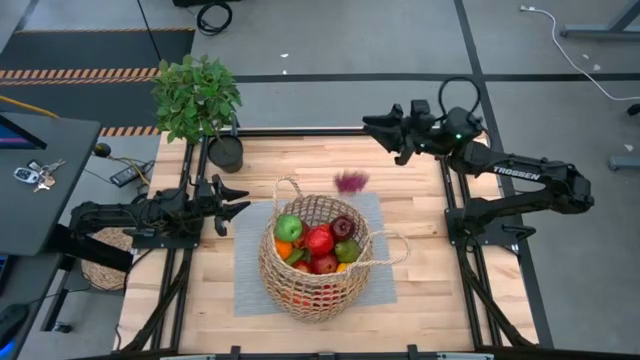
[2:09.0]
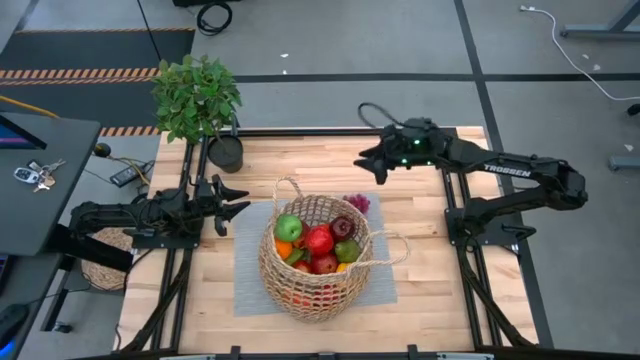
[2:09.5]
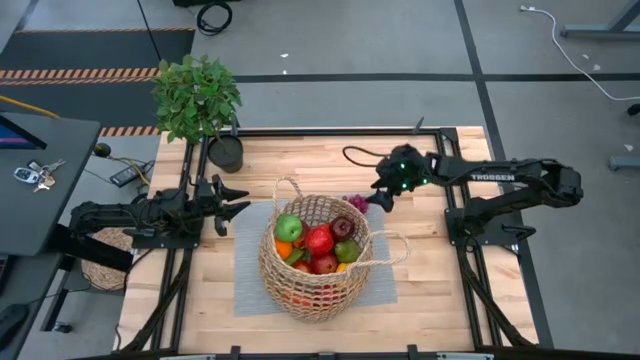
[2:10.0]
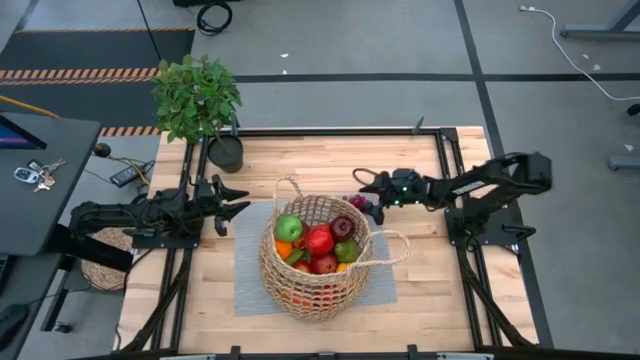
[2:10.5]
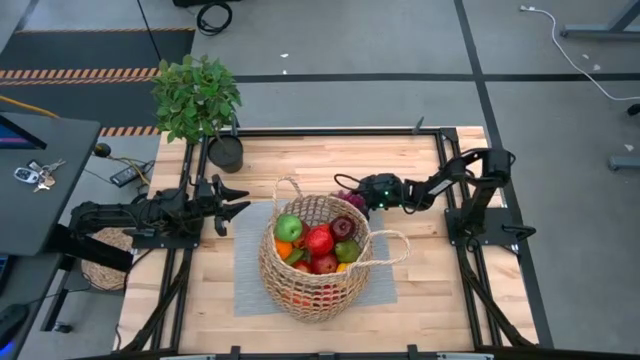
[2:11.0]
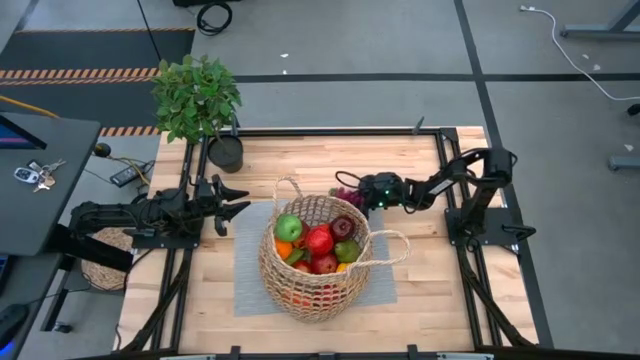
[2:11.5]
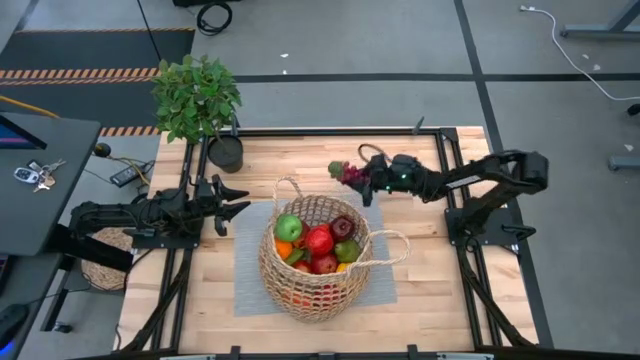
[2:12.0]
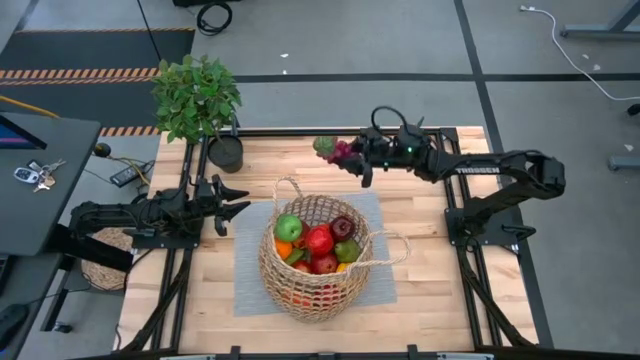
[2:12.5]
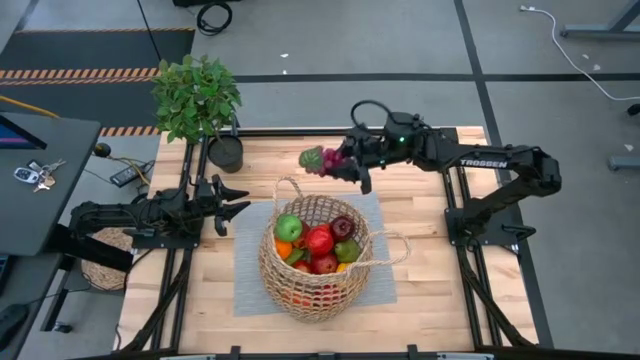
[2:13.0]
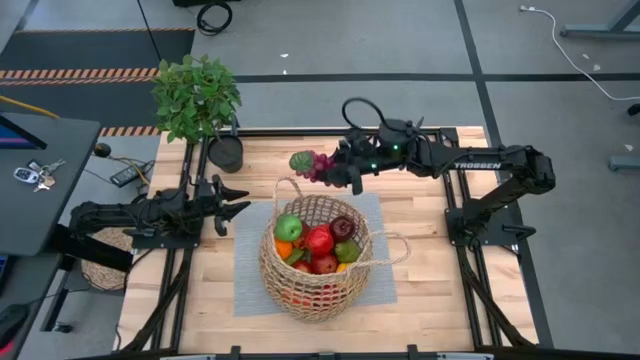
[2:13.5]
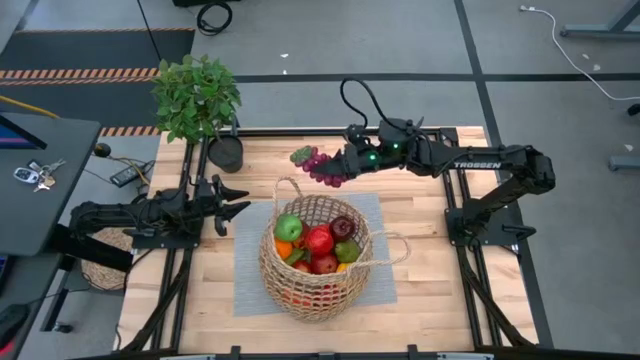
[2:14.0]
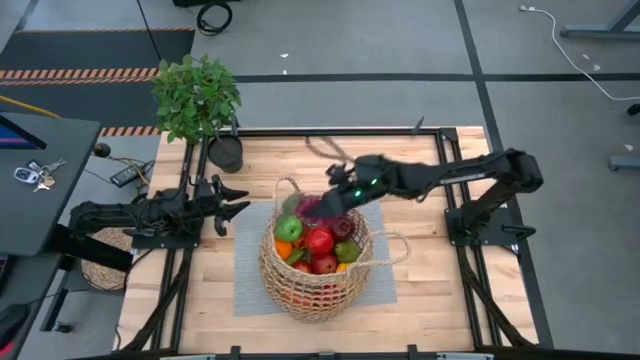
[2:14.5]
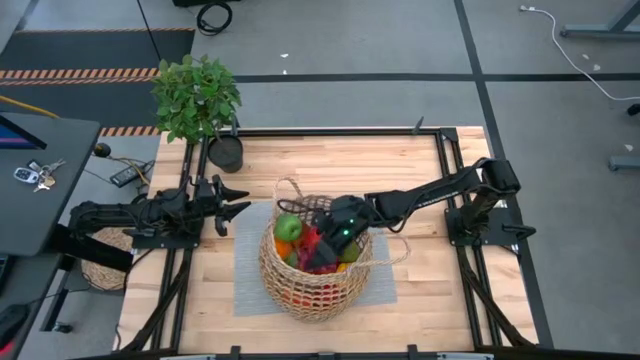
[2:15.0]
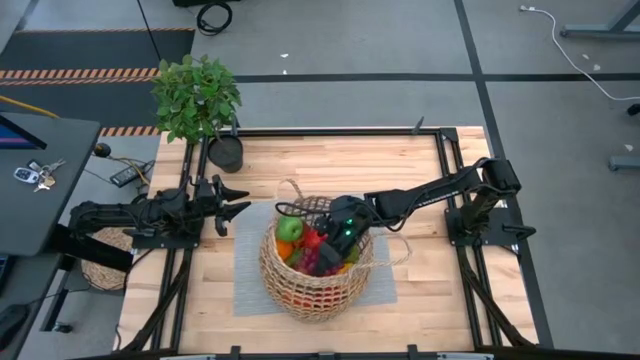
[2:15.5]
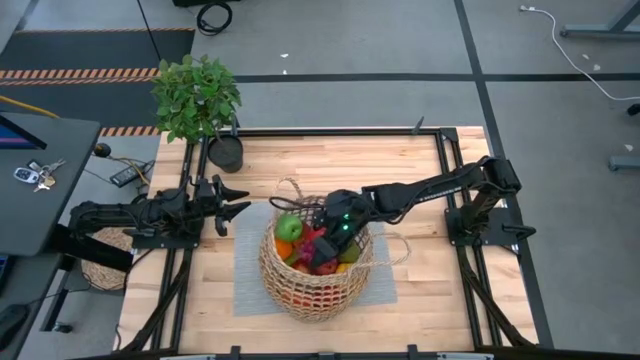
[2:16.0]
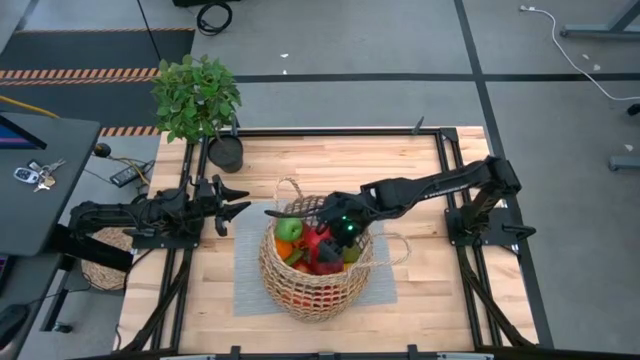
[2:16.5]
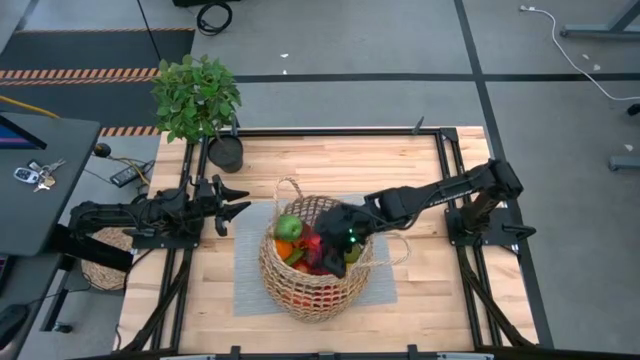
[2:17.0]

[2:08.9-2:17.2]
Task: Build produce basket
Put the purple grapes into the basket

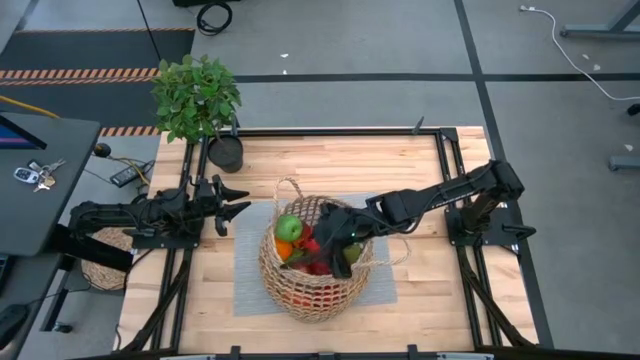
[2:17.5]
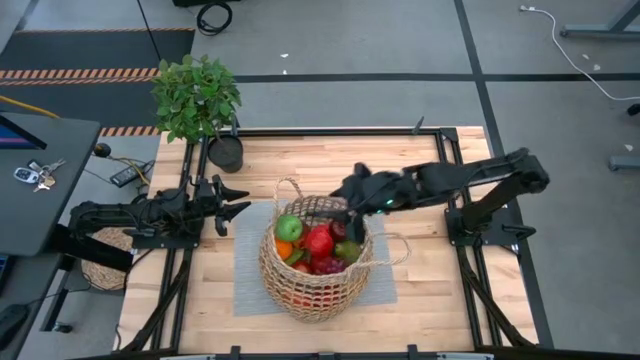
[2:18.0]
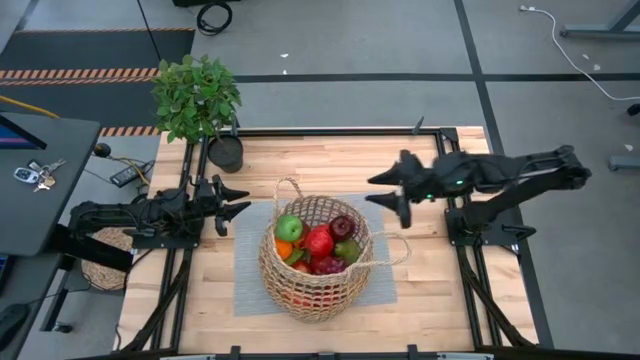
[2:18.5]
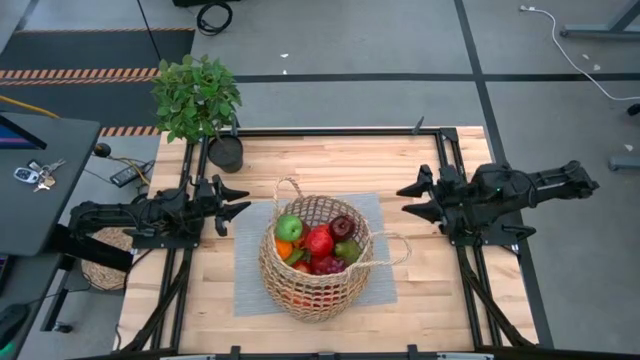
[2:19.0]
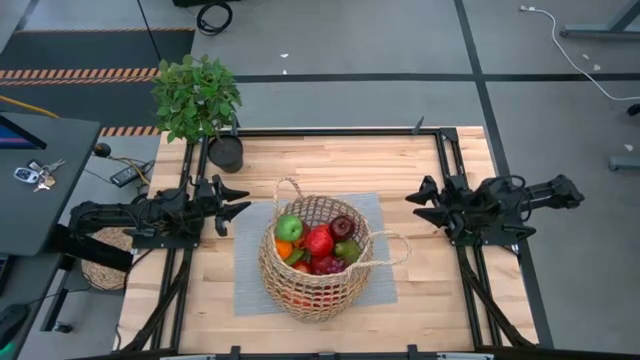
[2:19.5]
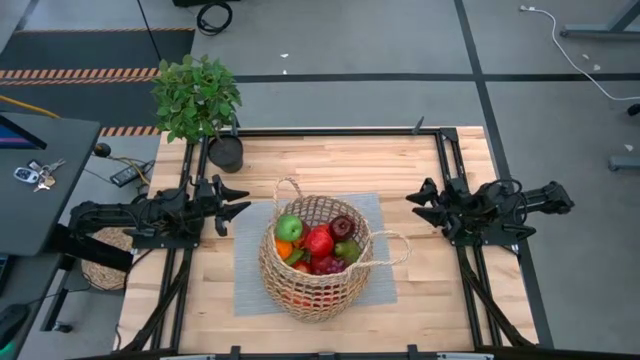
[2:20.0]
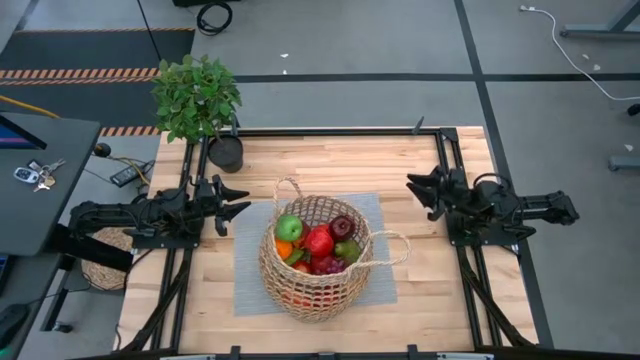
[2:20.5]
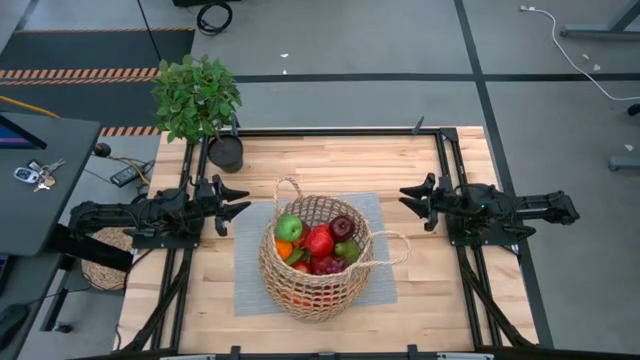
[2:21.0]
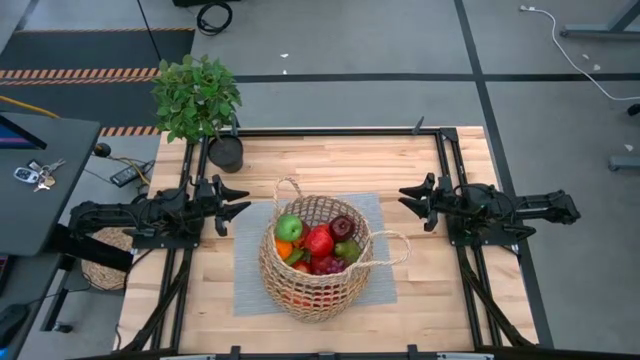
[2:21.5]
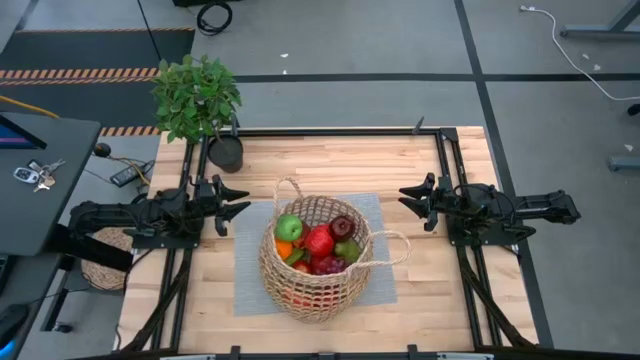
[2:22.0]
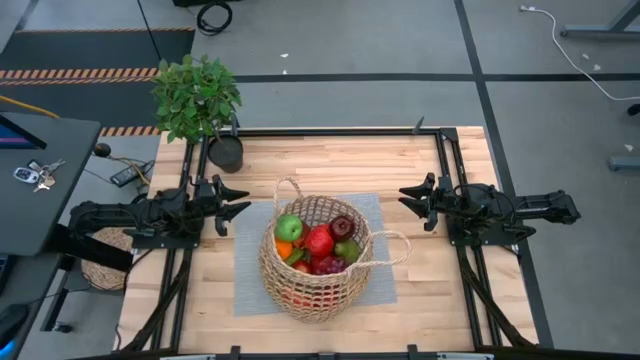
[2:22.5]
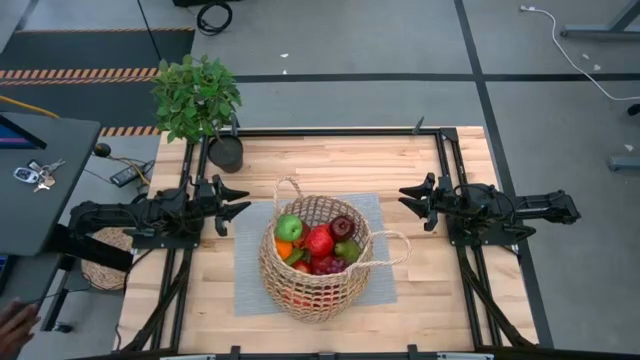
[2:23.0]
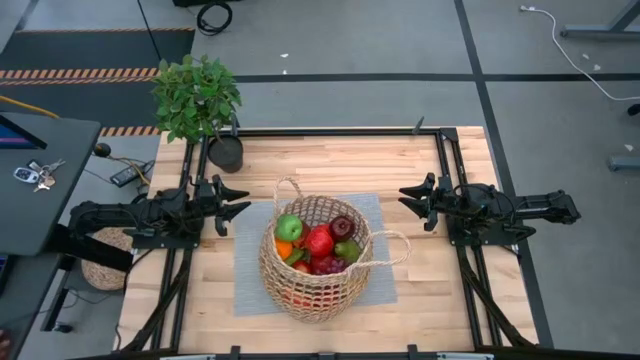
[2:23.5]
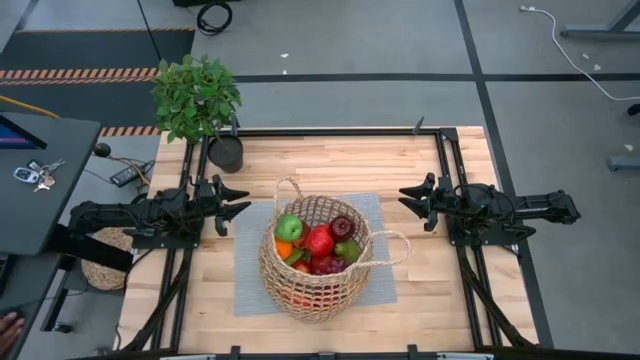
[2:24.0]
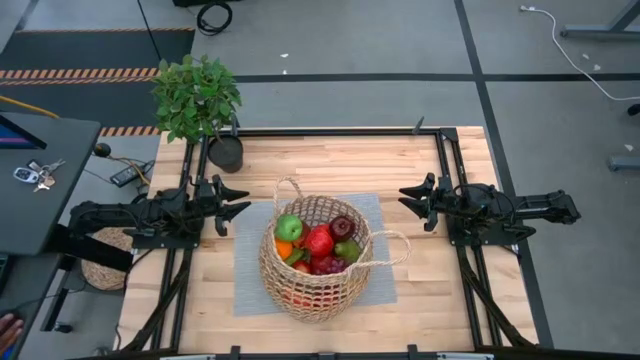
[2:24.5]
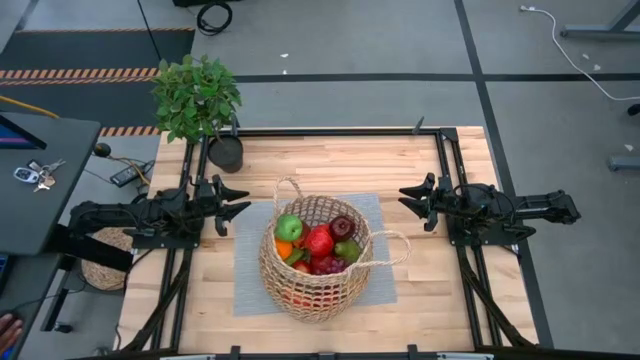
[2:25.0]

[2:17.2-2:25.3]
Return to Home Position

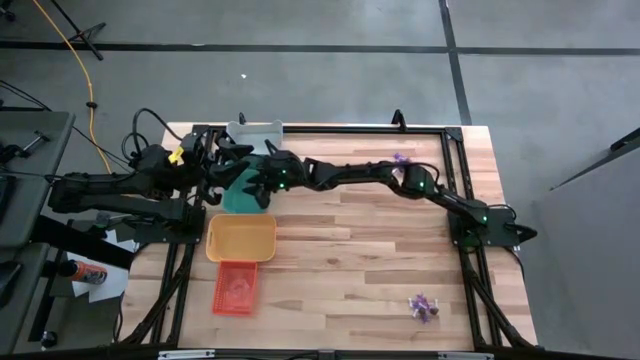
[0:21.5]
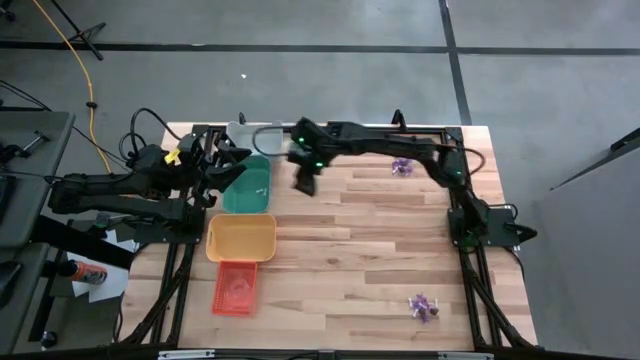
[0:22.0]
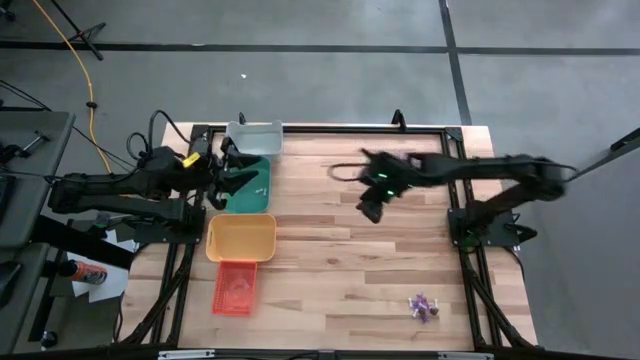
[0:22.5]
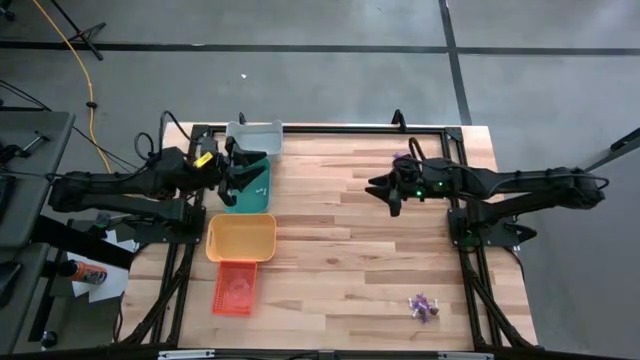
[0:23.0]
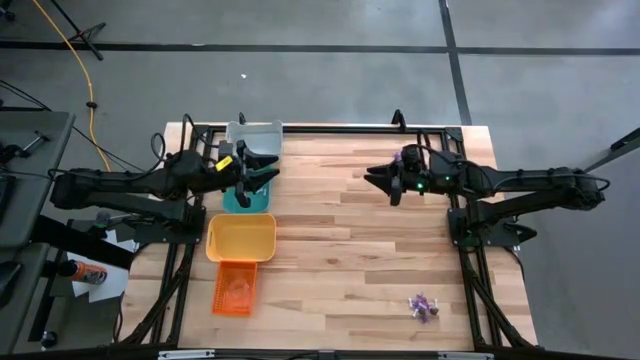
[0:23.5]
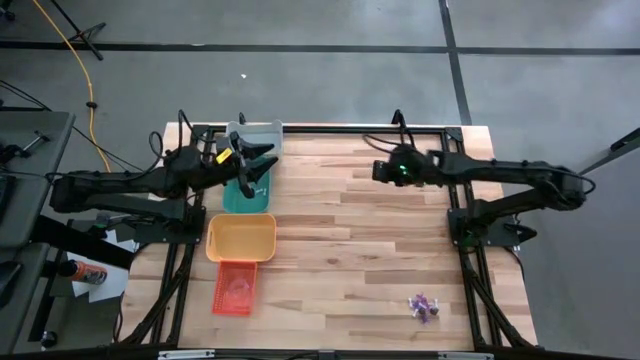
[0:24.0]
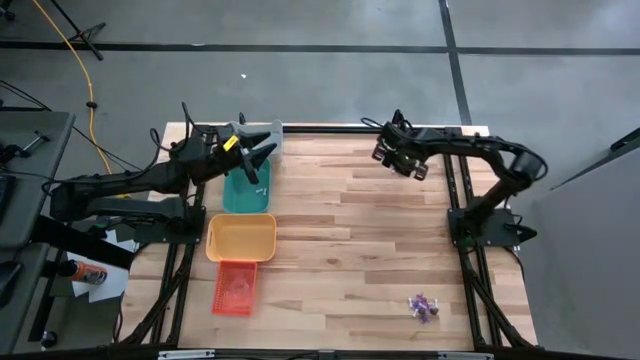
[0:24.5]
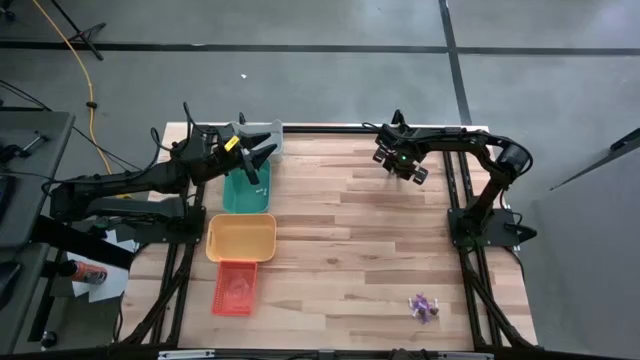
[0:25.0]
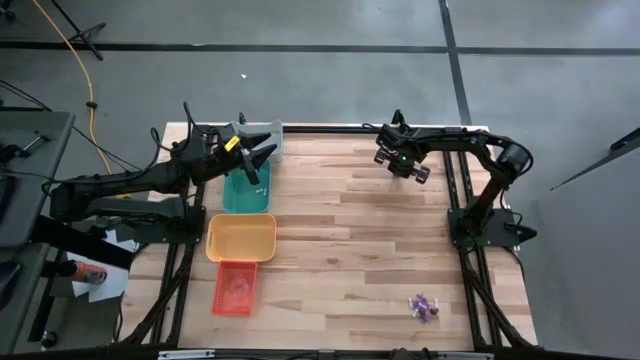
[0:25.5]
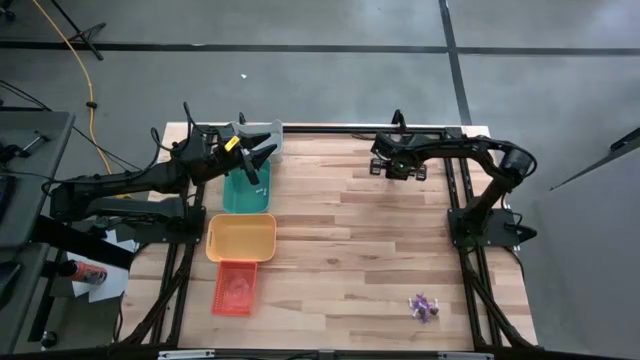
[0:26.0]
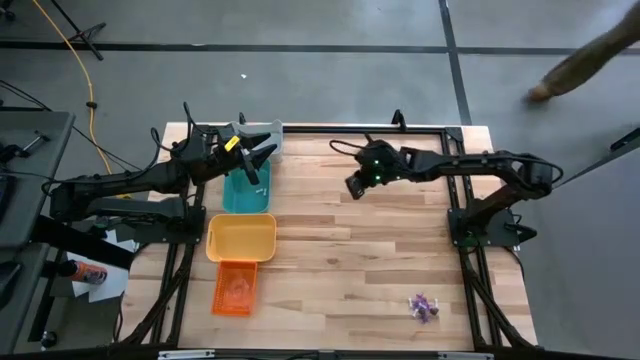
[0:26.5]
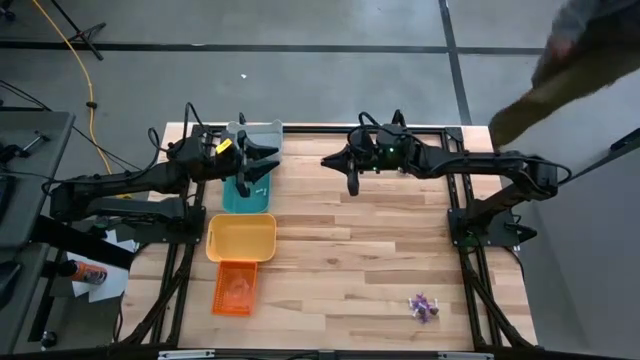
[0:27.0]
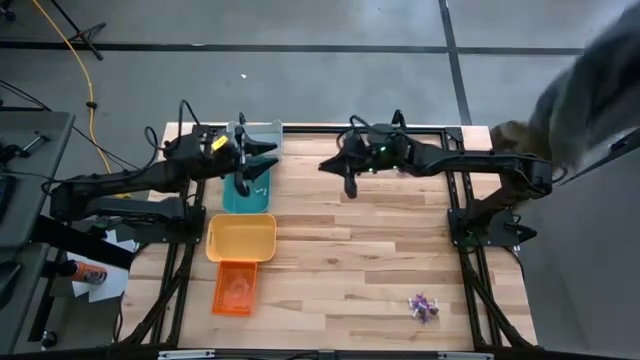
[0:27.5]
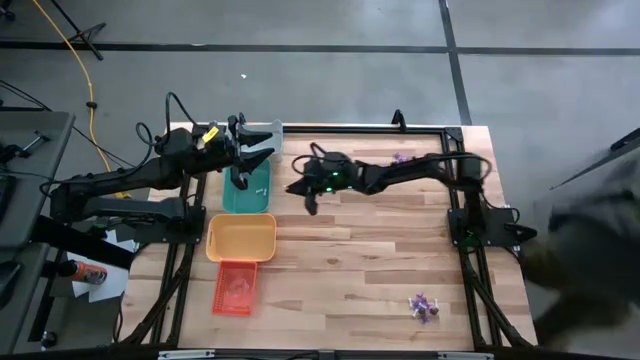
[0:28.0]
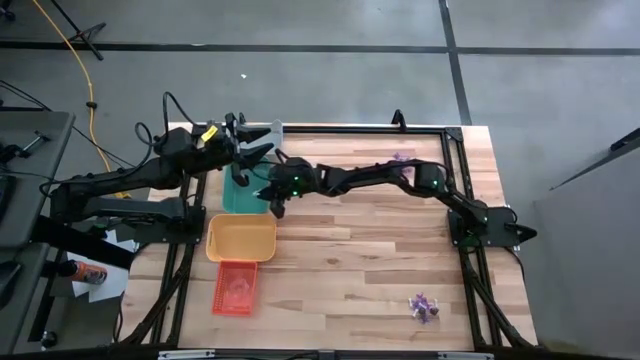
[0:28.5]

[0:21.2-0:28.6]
Task: Sort Halloween decoration
Put the white bone toy in the green bin
